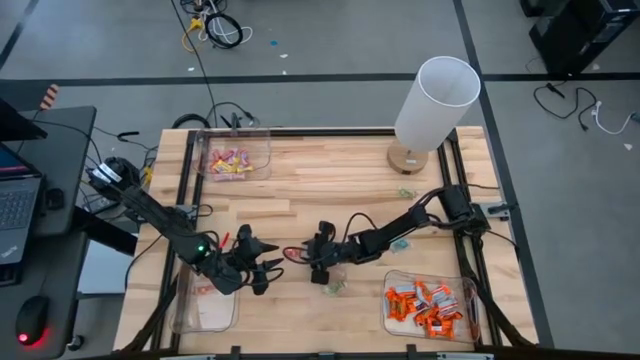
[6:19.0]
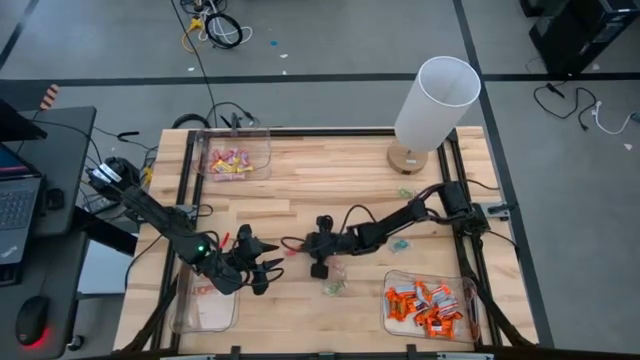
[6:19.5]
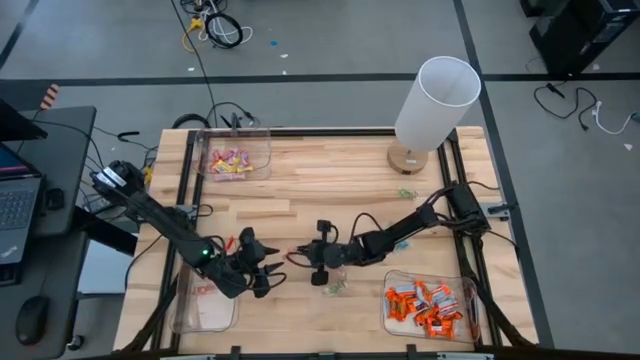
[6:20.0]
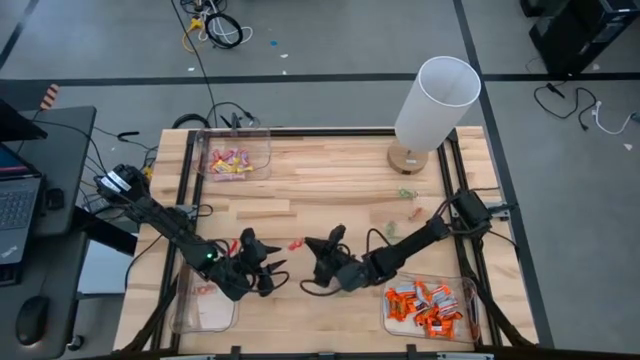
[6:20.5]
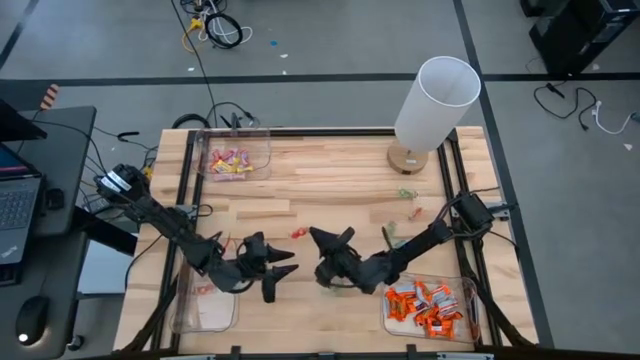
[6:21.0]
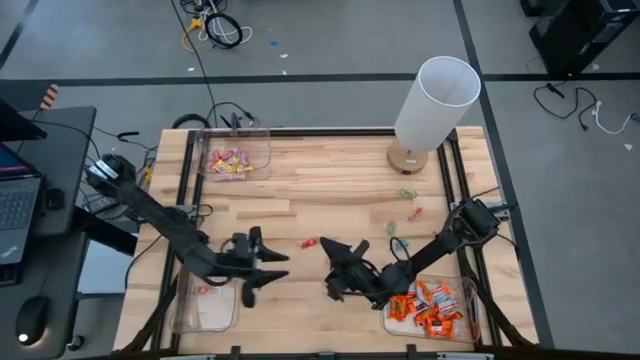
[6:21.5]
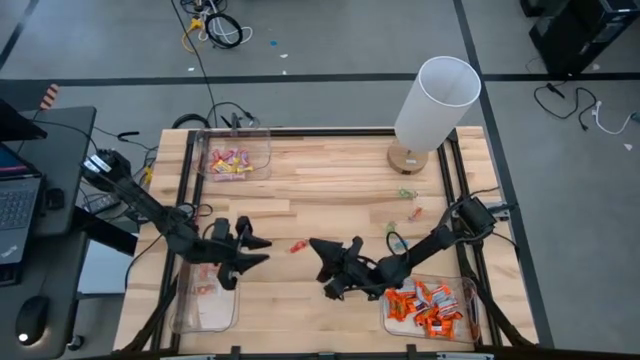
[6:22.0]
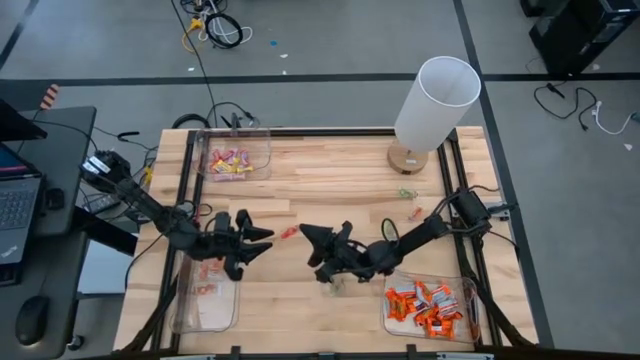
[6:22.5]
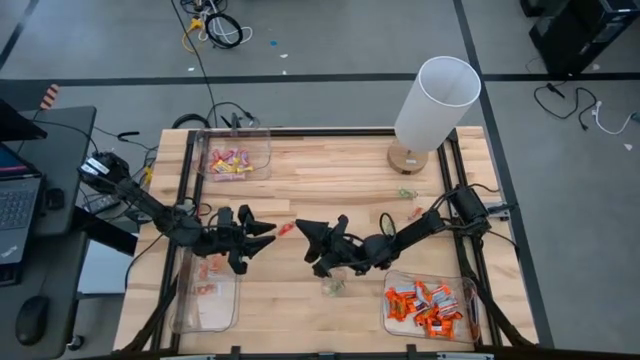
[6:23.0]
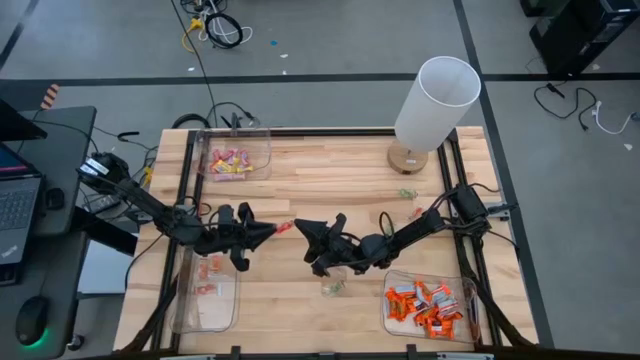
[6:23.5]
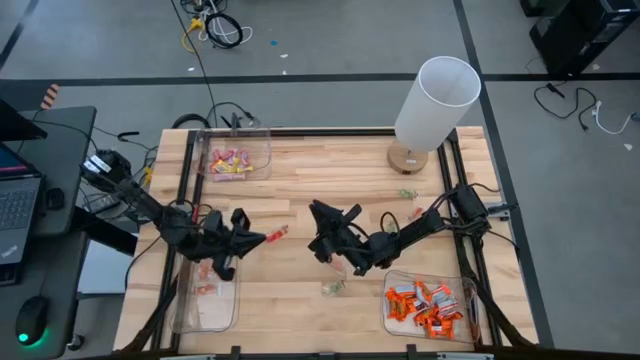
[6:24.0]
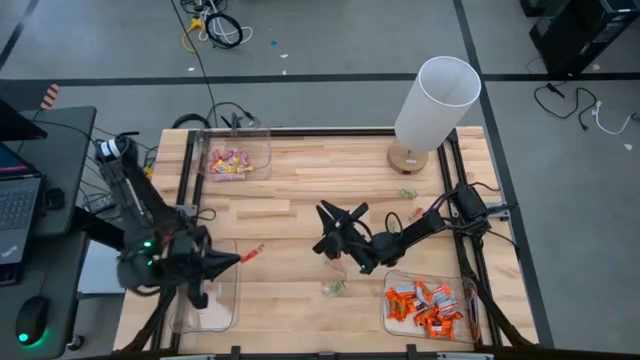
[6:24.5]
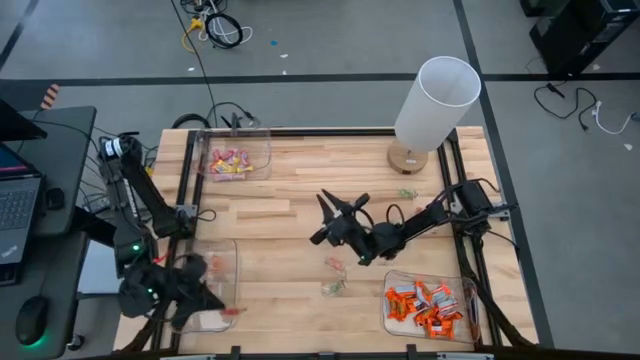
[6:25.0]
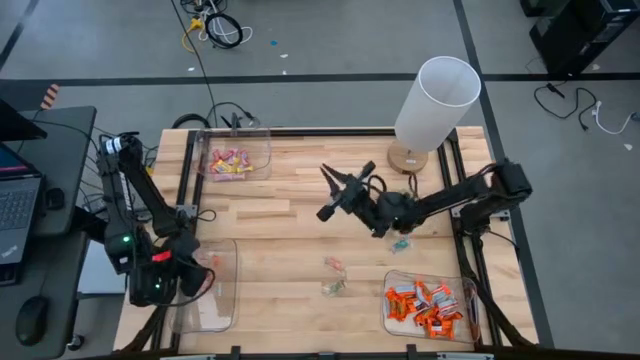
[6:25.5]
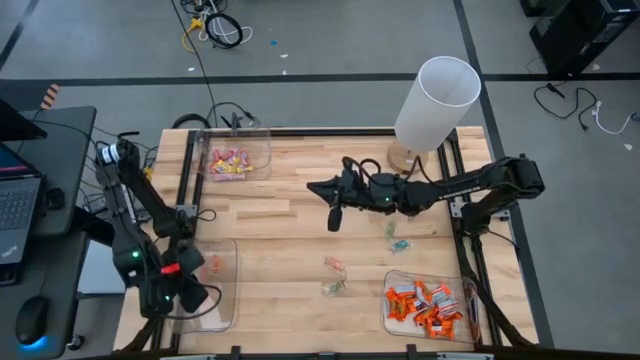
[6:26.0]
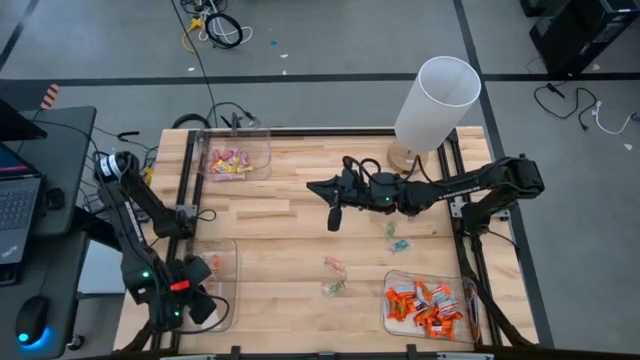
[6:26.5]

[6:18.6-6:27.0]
Task: Sort candy
Put the orange gummy into the bottom left transparent bin

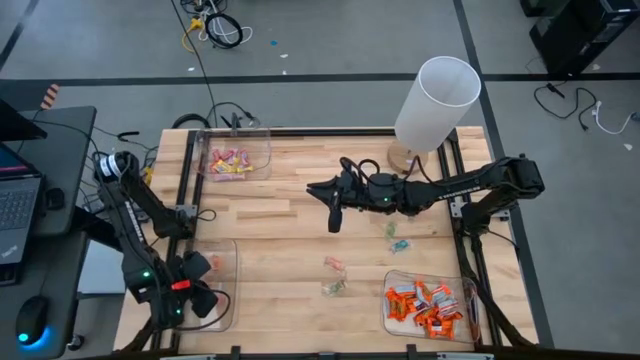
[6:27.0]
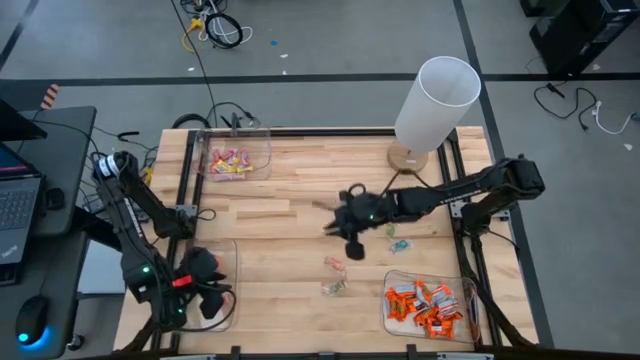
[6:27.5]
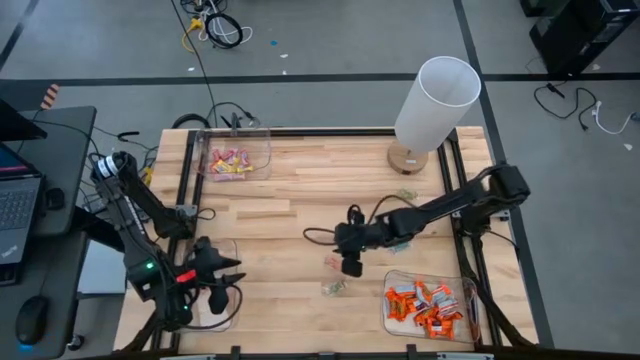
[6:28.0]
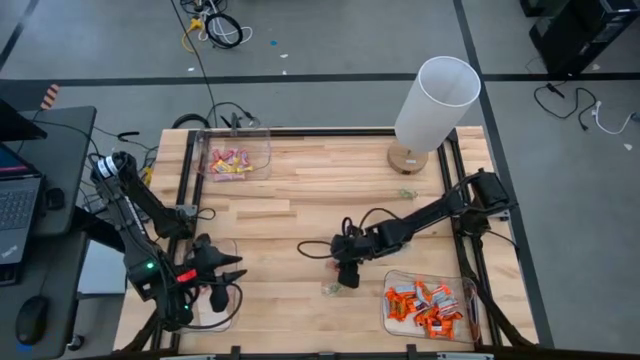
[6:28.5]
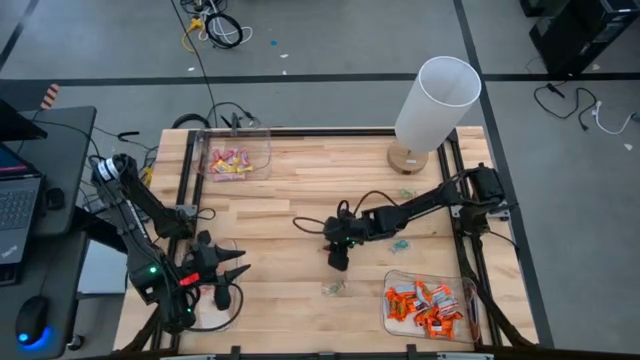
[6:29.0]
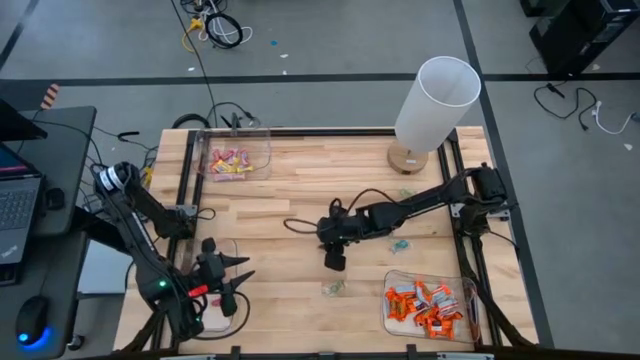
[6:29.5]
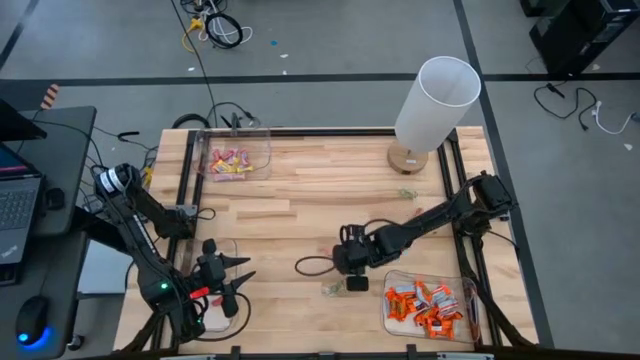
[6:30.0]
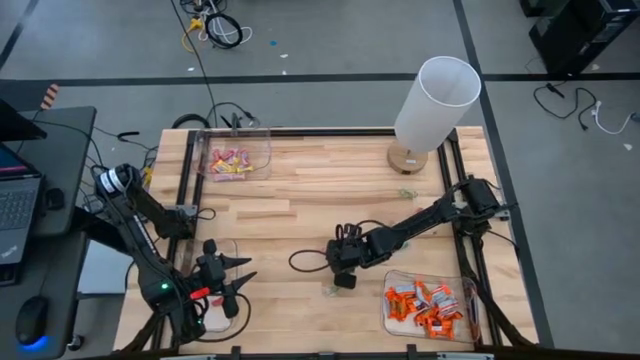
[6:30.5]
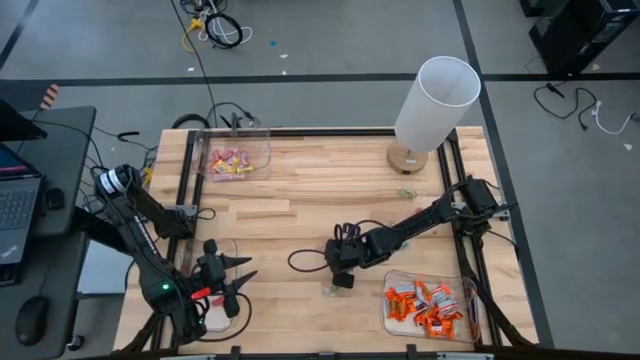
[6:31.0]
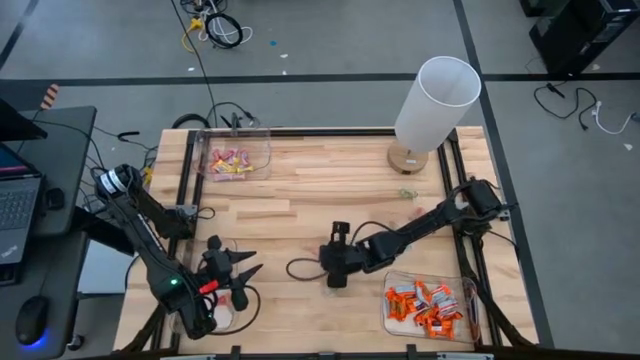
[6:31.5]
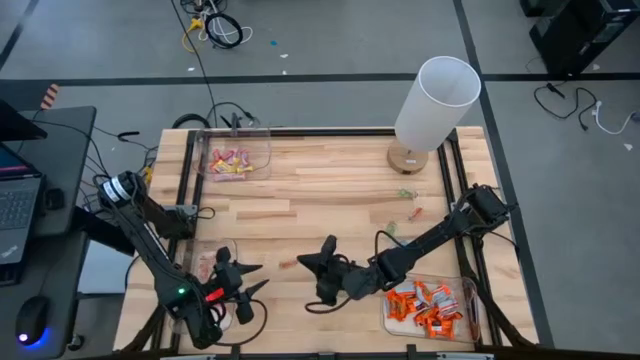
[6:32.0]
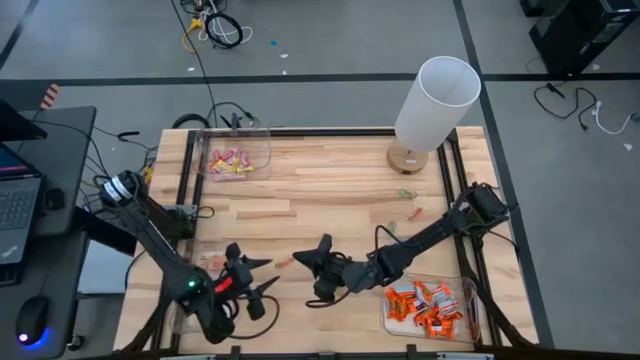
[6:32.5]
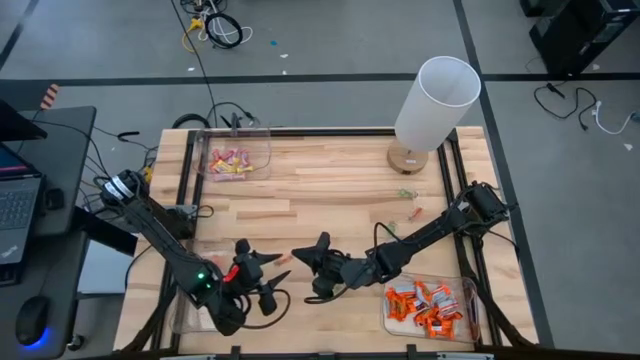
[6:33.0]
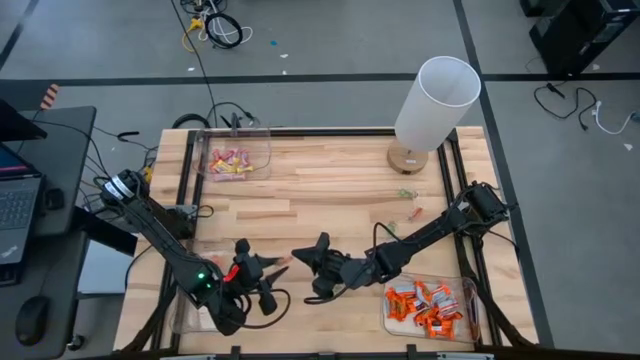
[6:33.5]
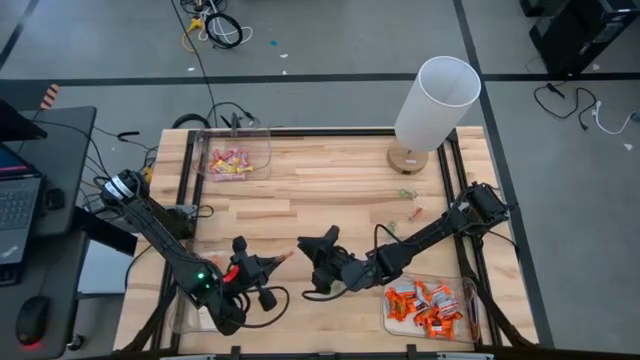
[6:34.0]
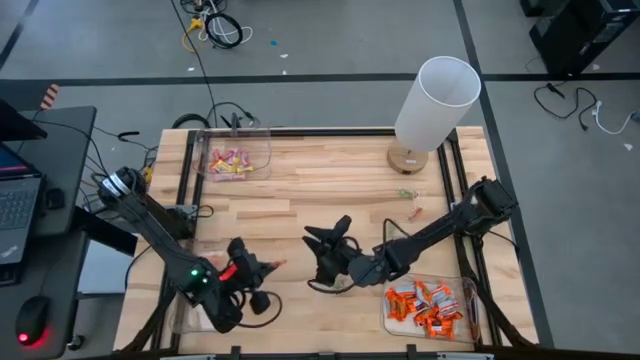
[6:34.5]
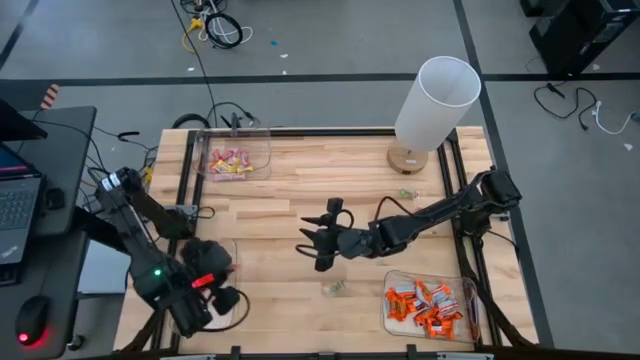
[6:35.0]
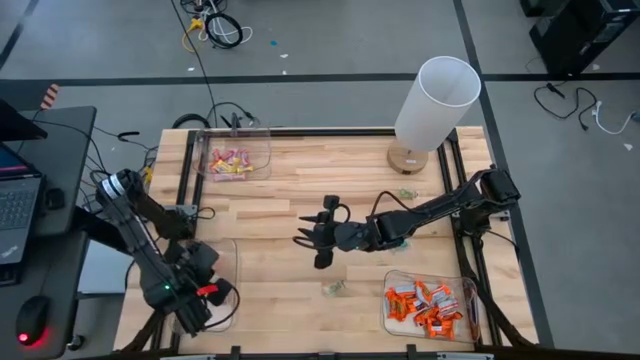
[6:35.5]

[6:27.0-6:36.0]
Put the orange gummy into the bottom left transparent bin

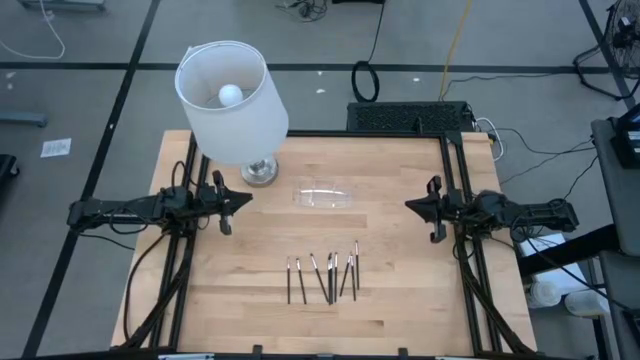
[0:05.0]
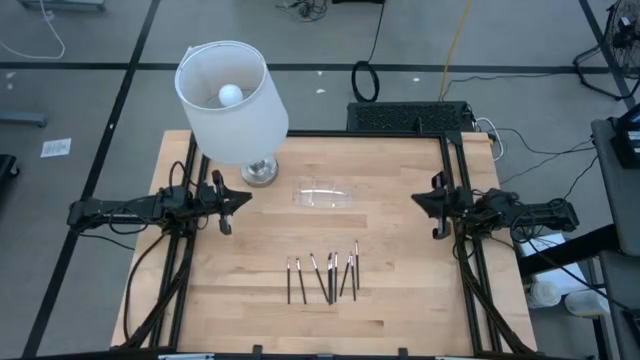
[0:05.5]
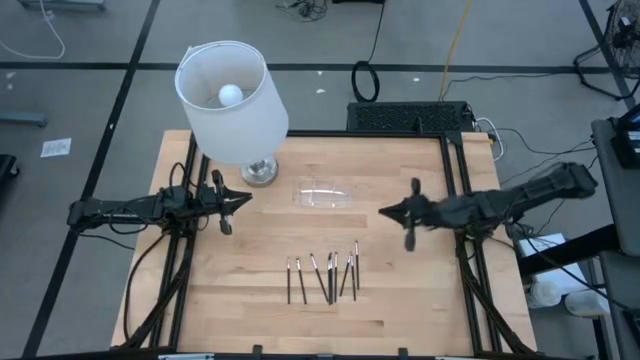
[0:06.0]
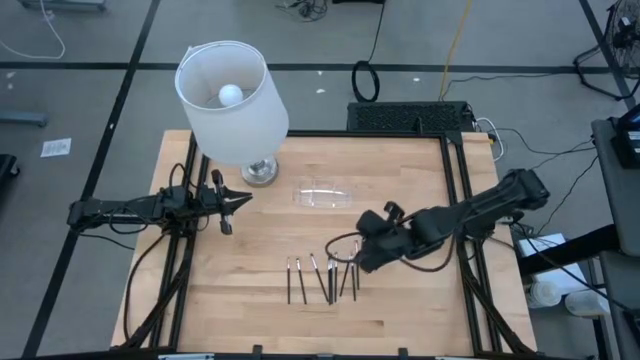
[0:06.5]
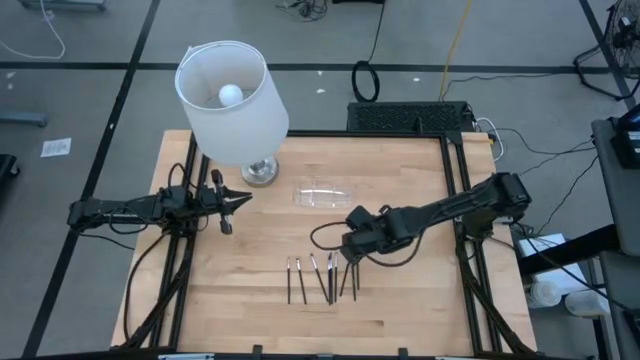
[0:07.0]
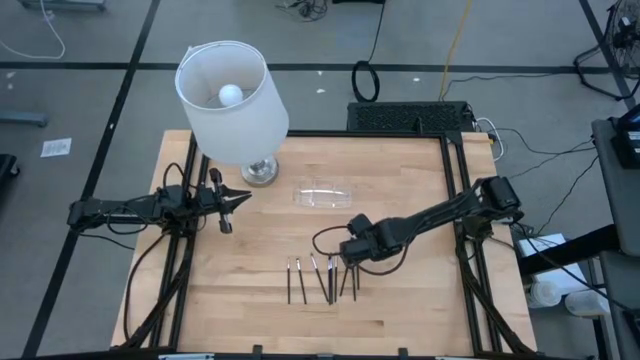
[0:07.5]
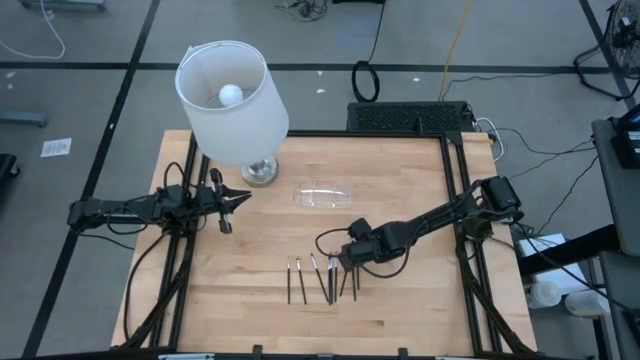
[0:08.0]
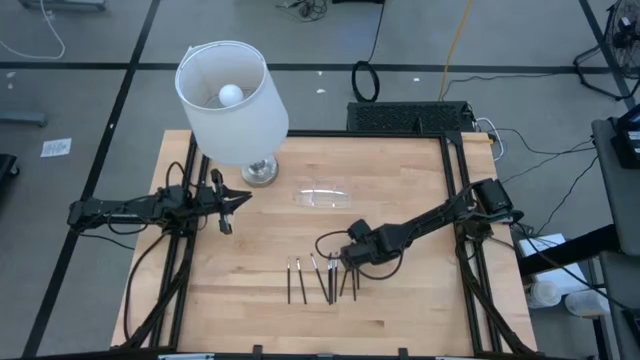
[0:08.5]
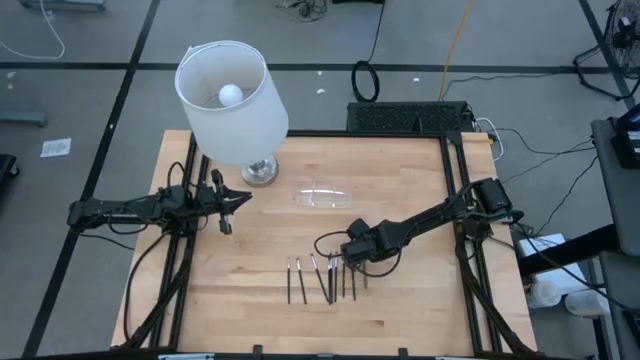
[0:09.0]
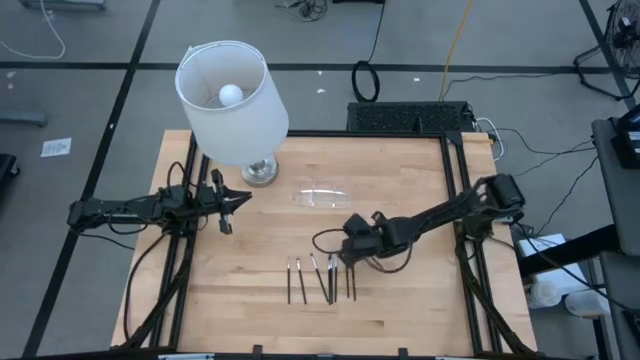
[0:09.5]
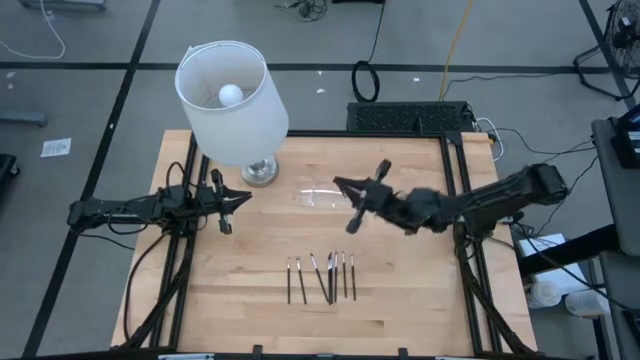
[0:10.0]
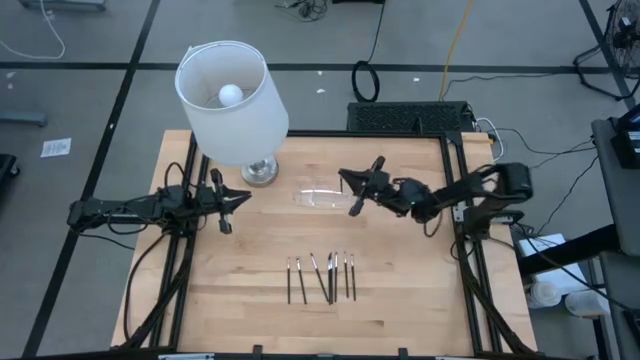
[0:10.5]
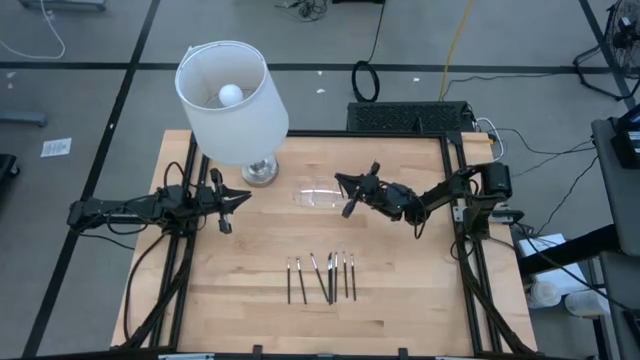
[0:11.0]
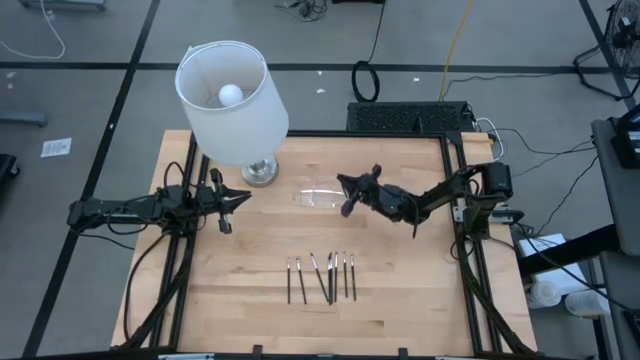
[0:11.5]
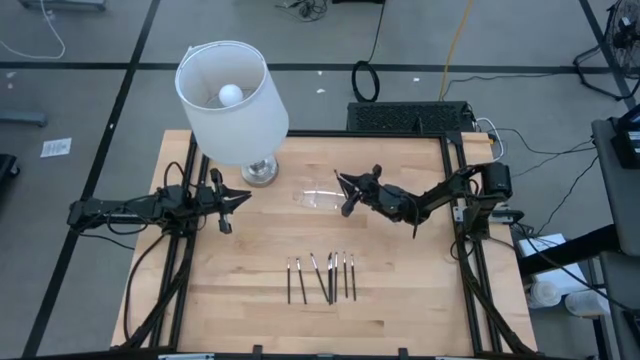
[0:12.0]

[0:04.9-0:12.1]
Task: Put items in baskets/containers
Put the black eyeshadow brush into the transparent organizer
